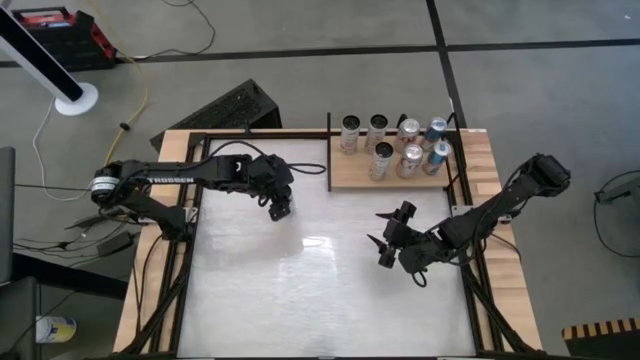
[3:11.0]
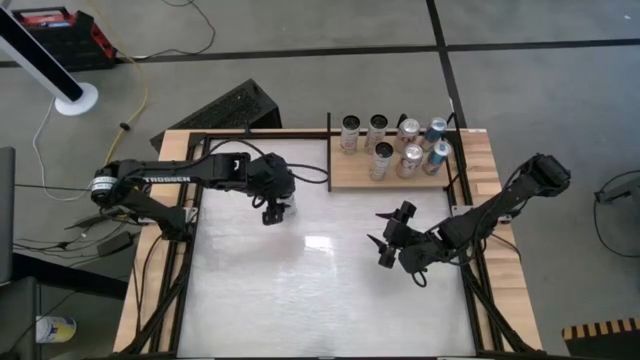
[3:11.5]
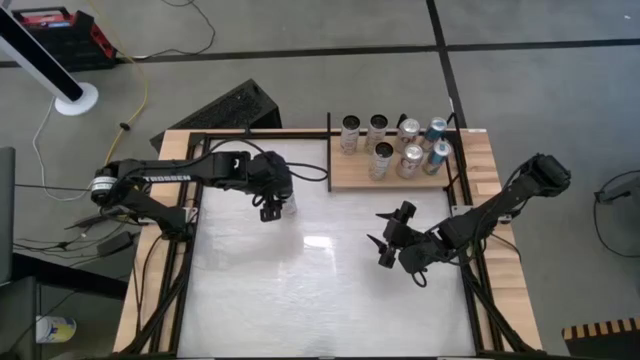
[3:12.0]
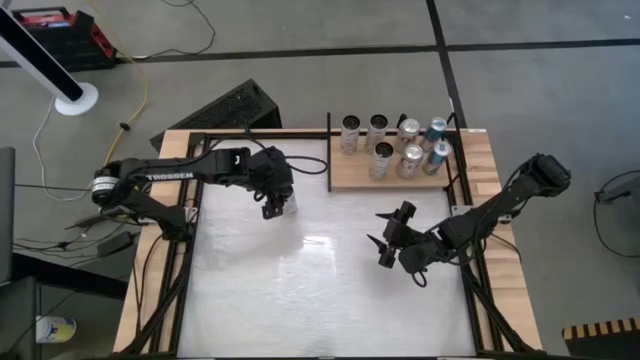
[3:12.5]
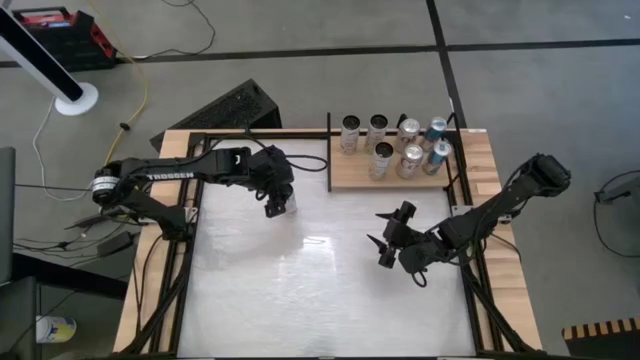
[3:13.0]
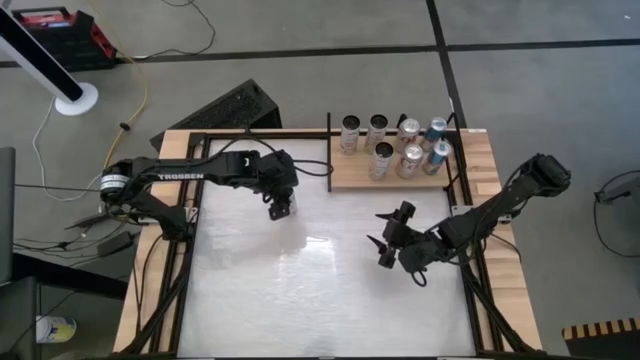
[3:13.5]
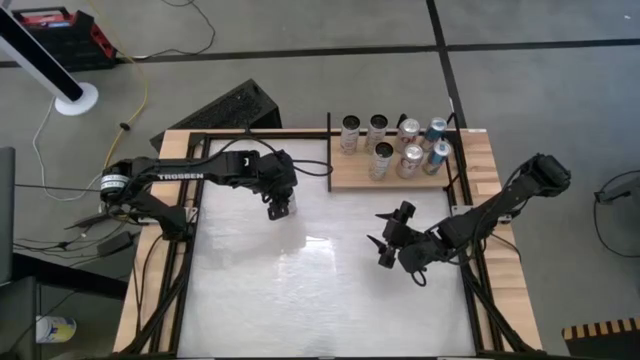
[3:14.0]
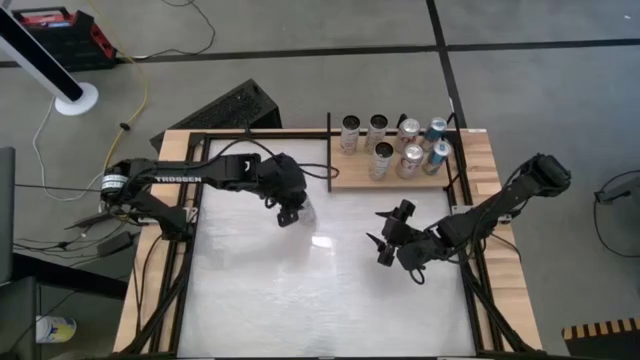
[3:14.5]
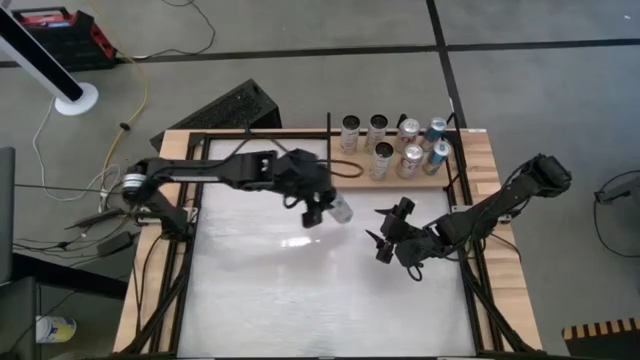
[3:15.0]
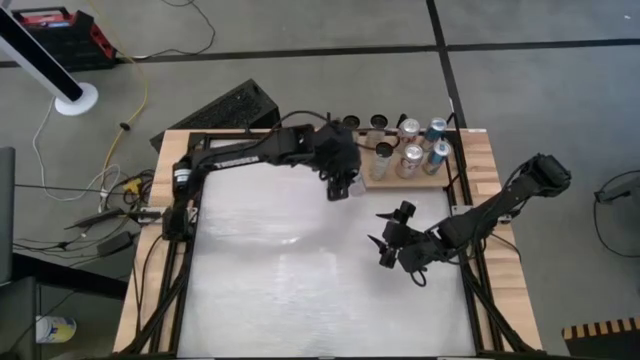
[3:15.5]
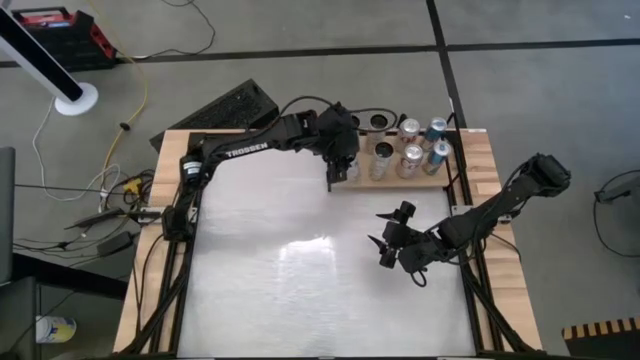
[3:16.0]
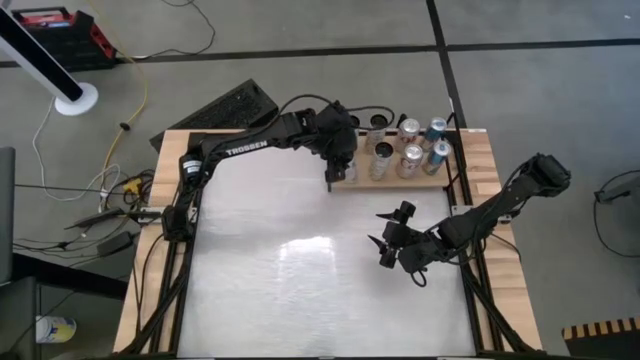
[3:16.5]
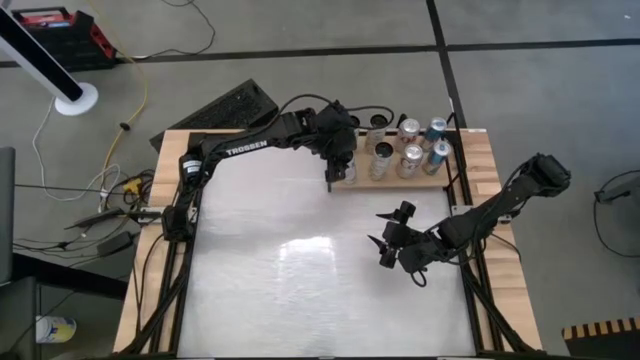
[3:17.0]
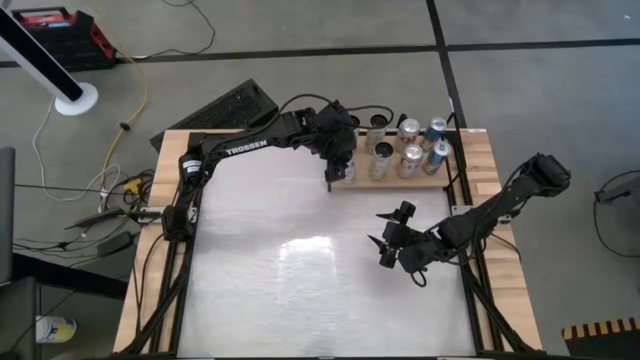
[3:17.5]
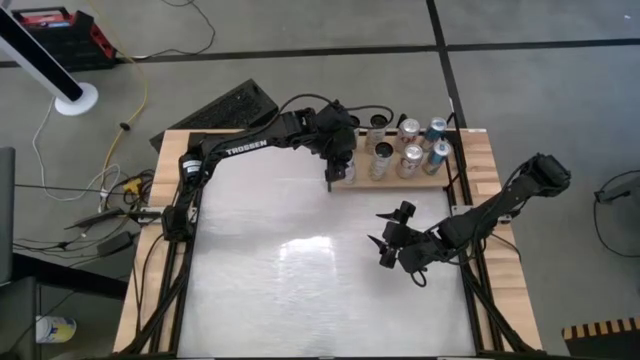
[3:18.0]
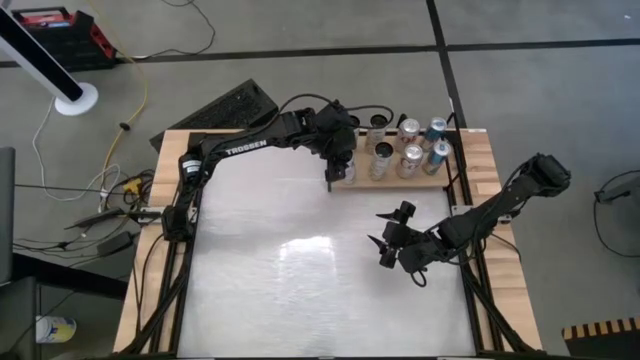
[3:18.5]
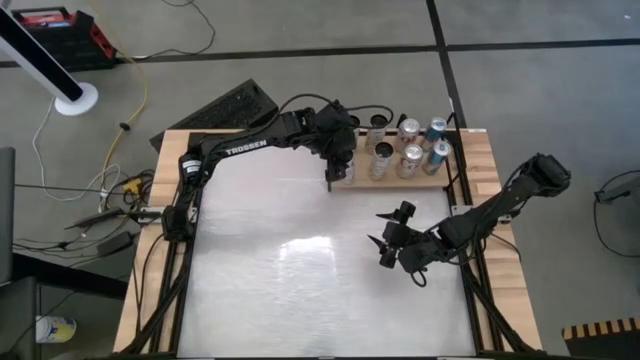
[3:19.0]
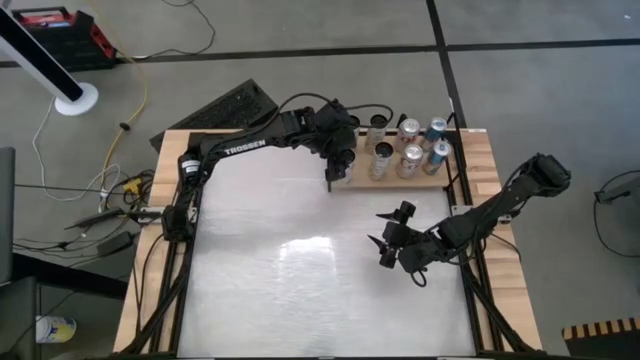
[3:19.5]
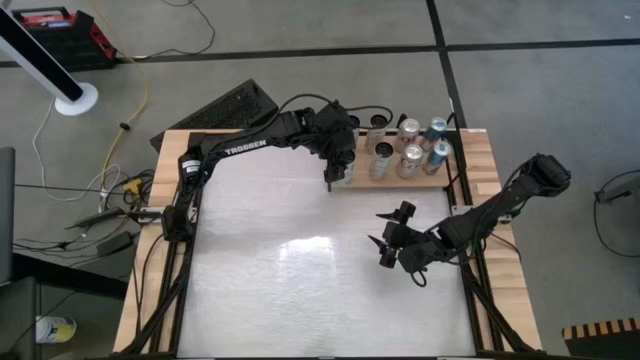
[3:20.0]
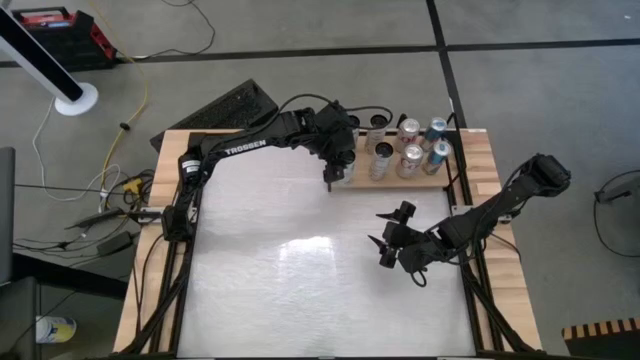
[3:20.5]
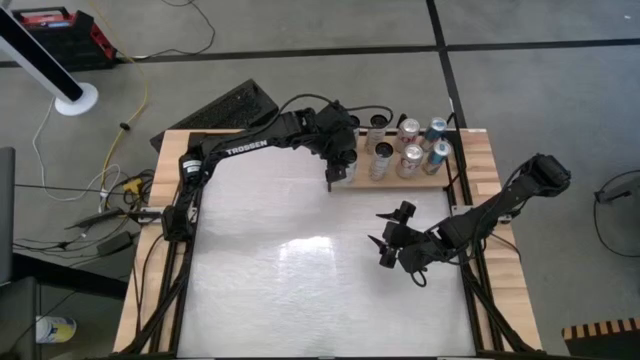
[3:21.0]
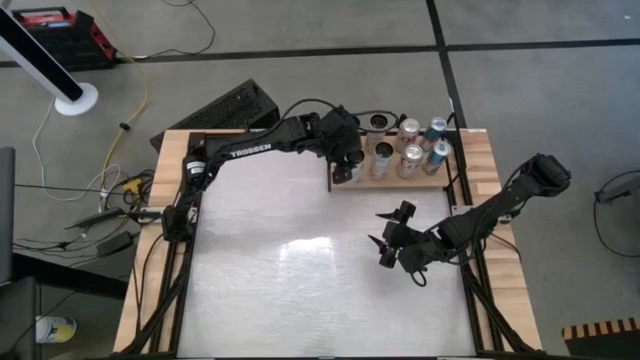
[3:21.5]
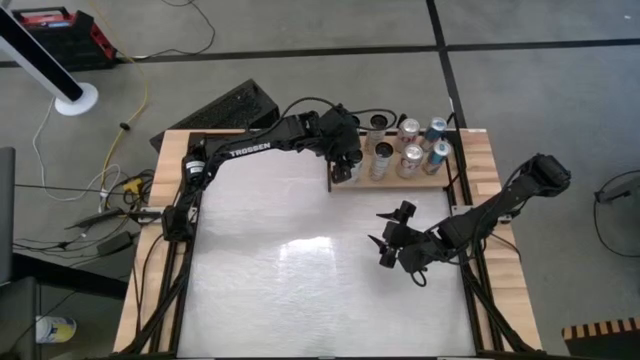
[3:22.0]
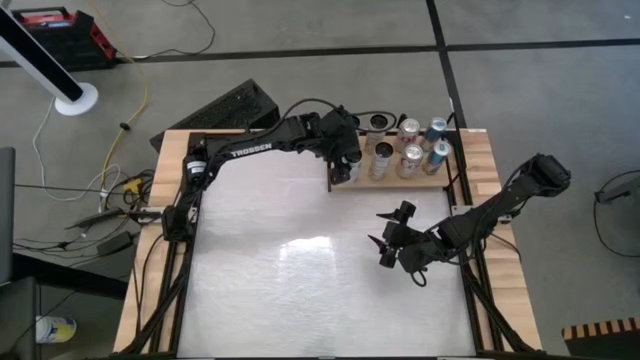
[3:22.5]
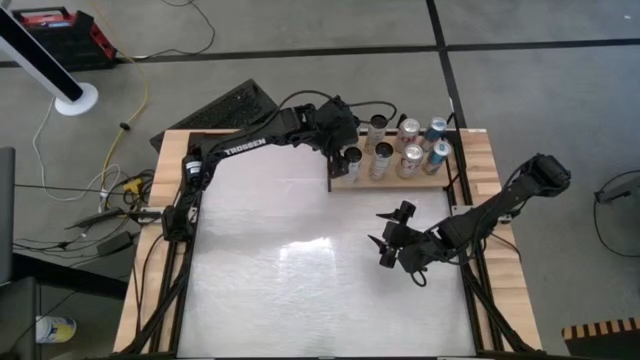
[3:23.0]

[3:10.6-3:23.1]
Task: Place canned beverage on shelf
Put the white and pink soda can on the shelf aligned with the other white and pink soda can

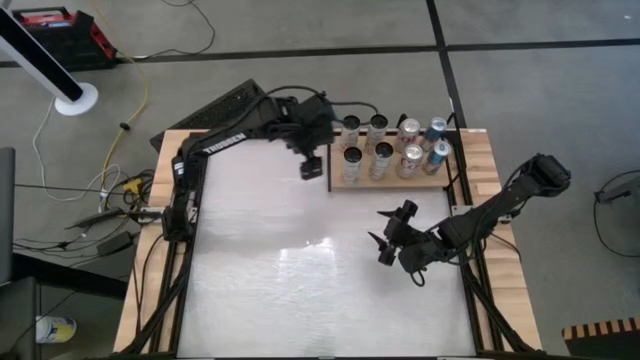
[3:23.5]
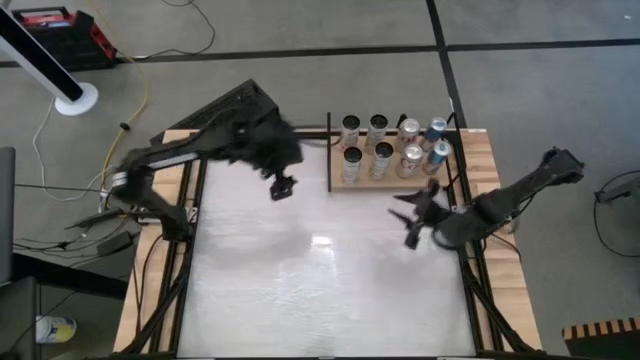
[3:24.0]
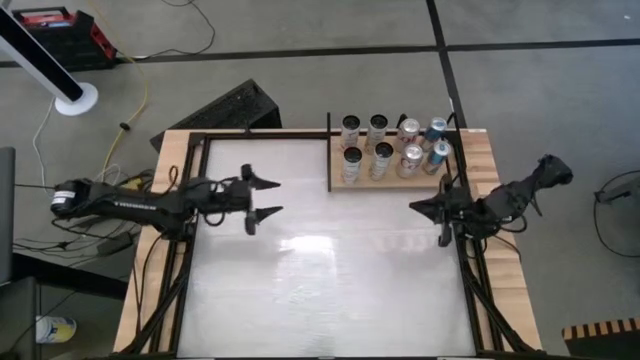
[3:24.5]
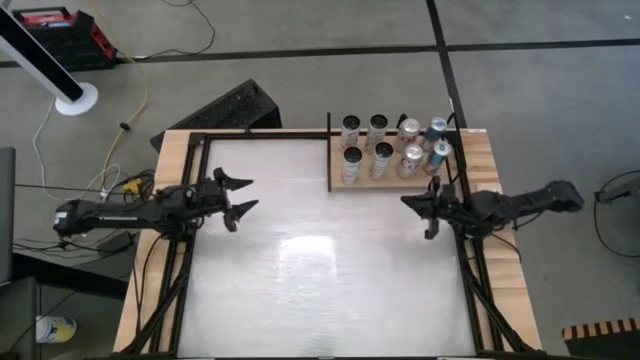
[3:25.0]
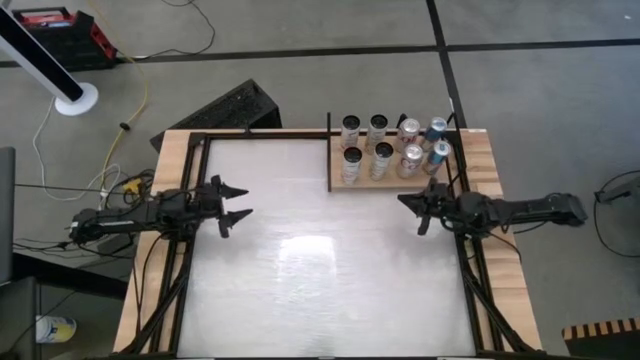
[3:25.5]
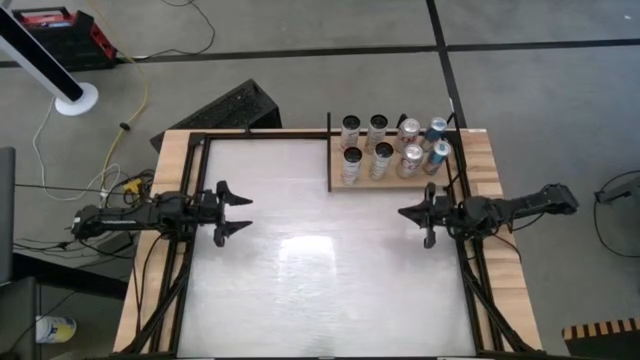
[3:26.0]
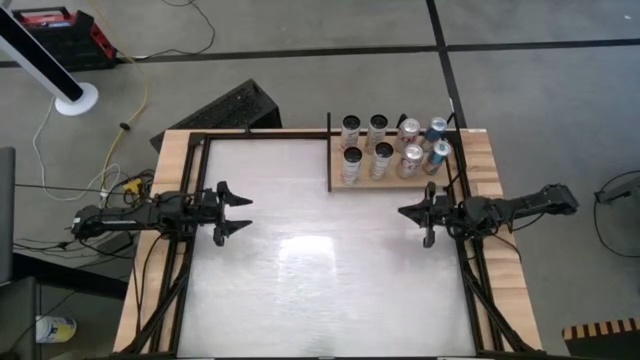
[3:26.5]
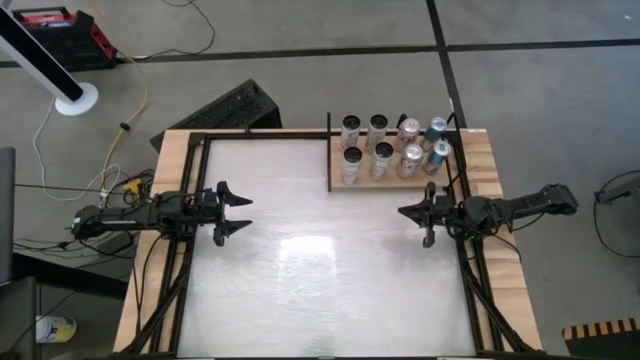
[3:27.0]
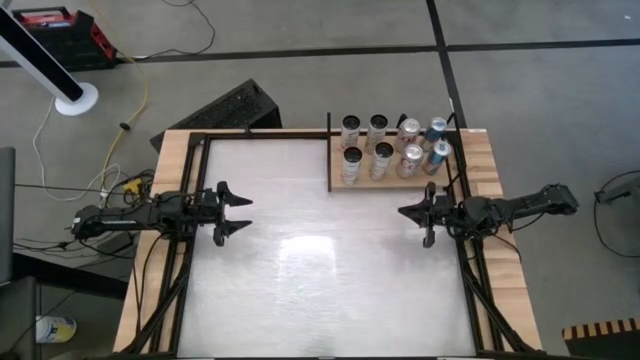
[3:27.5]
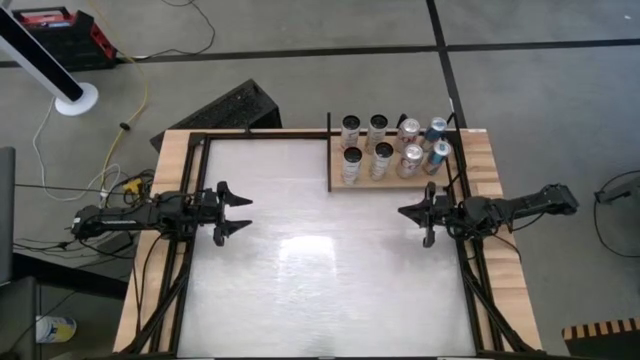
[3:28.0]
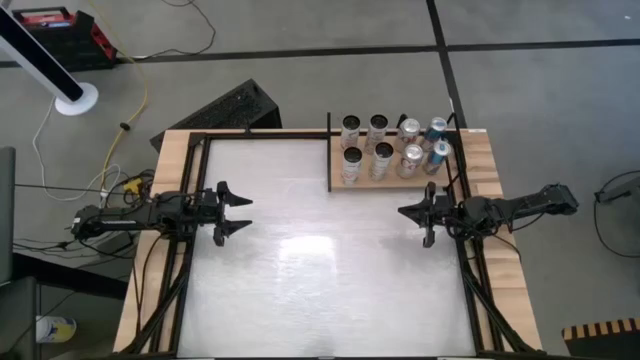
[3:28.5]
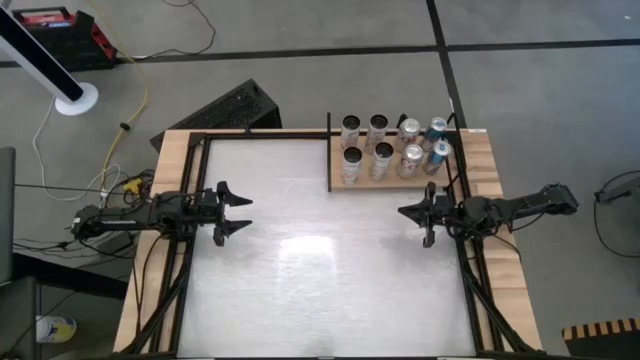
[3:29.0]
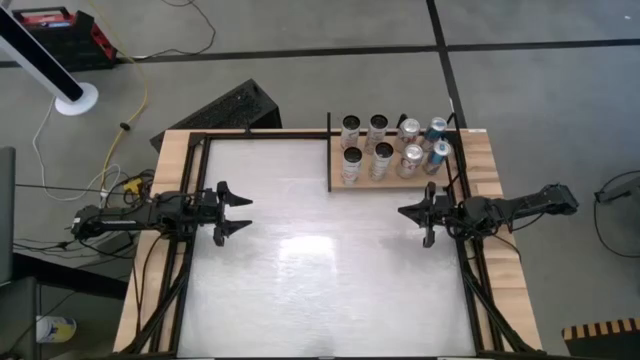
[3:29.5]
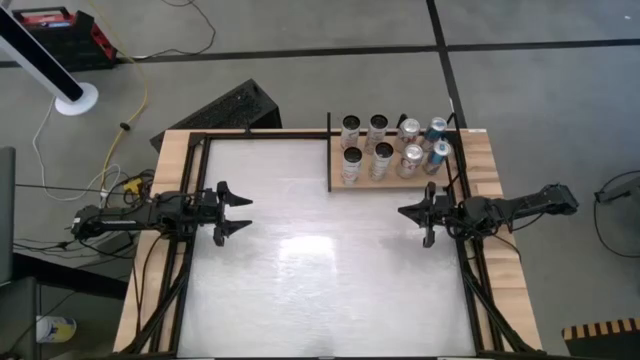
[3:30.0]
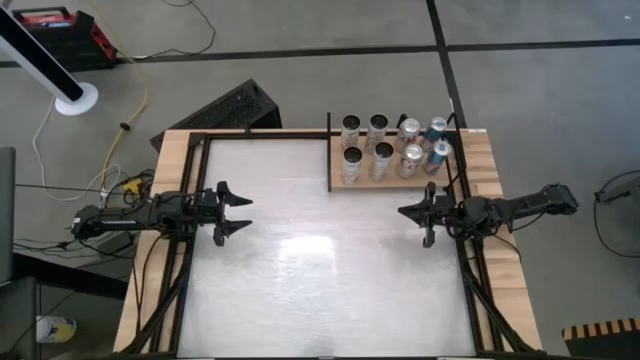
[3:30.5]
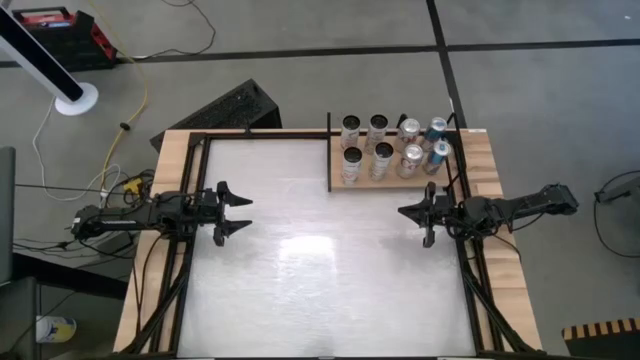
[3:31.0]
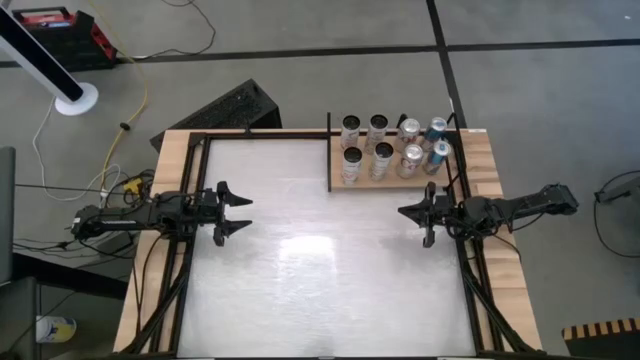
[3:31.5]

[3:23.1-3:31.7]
Return to Home Position
